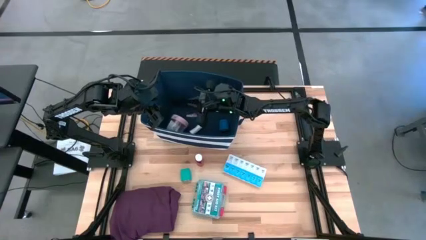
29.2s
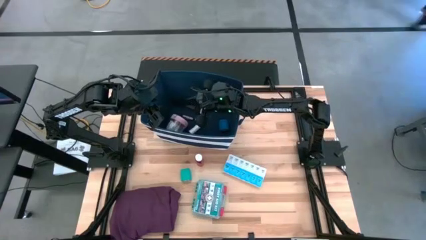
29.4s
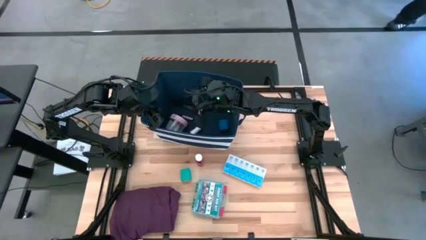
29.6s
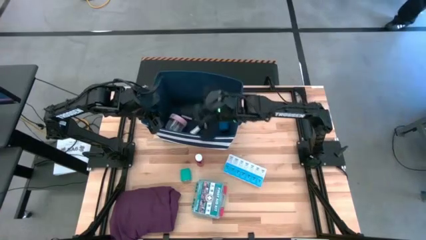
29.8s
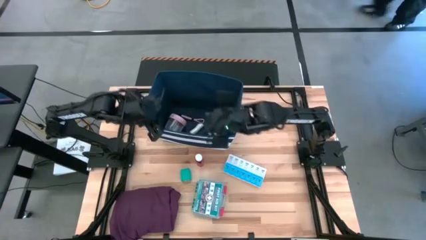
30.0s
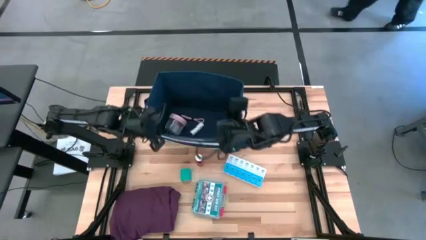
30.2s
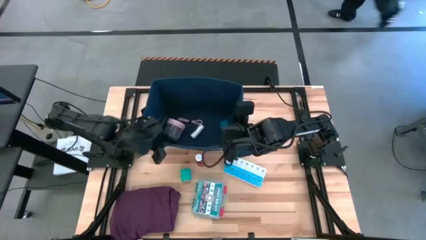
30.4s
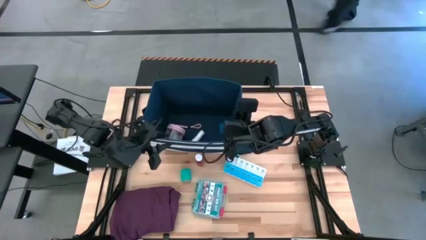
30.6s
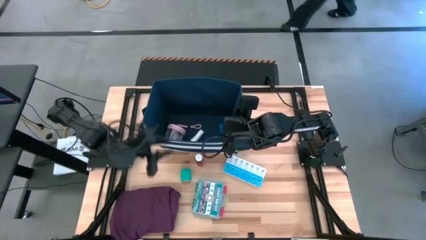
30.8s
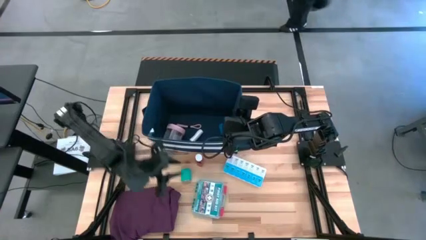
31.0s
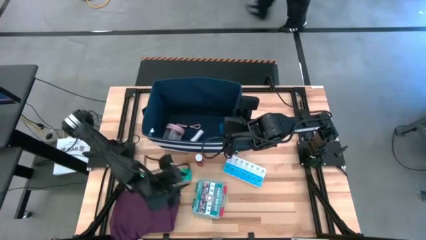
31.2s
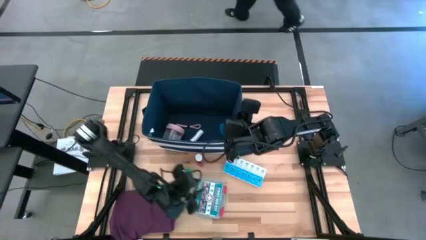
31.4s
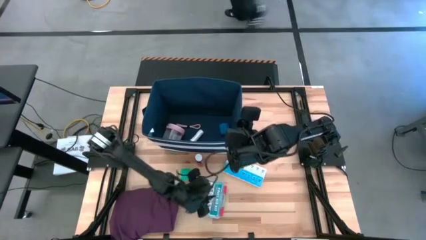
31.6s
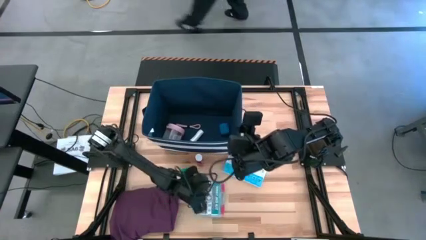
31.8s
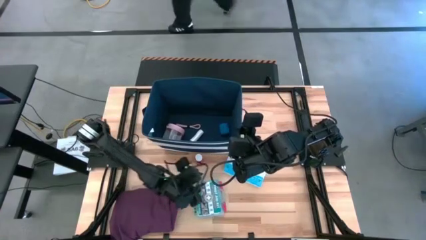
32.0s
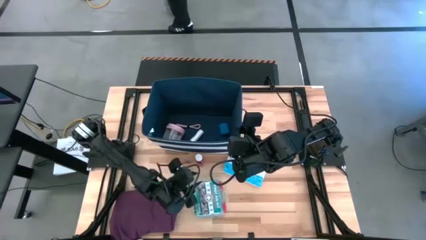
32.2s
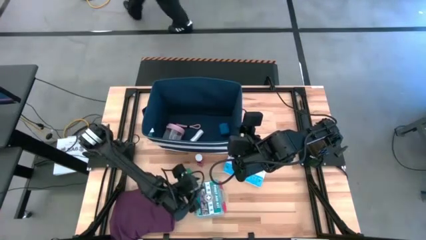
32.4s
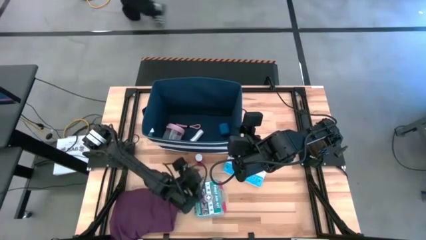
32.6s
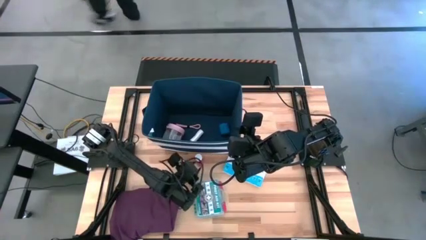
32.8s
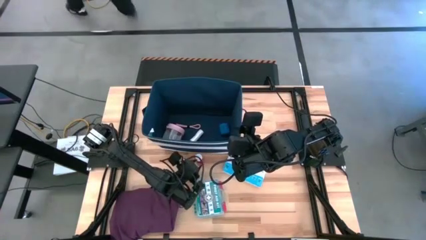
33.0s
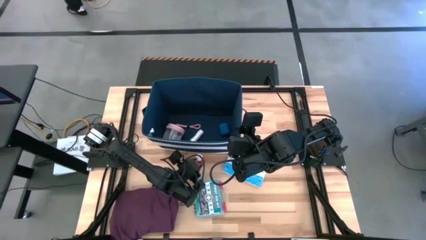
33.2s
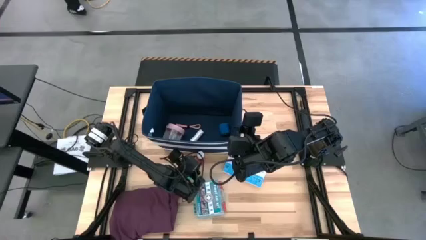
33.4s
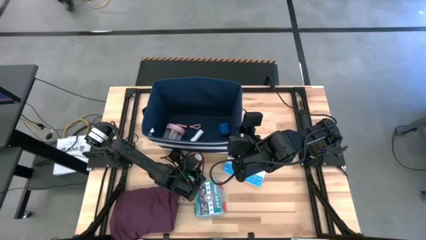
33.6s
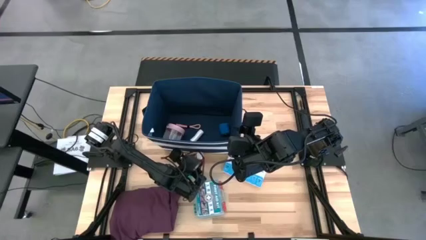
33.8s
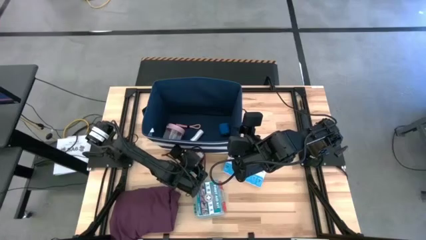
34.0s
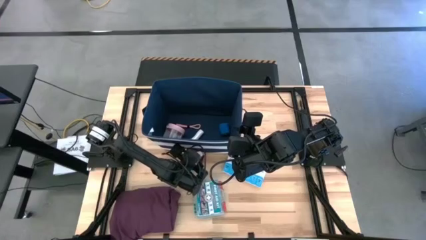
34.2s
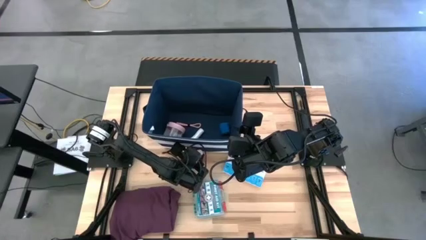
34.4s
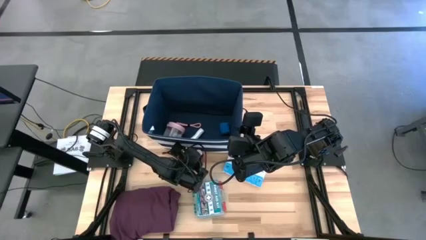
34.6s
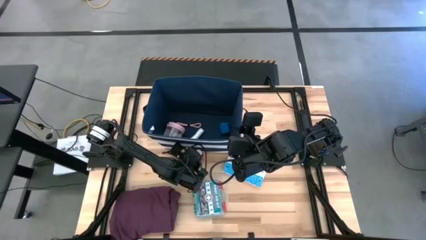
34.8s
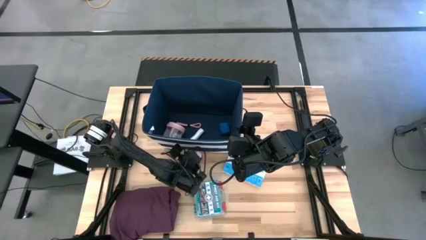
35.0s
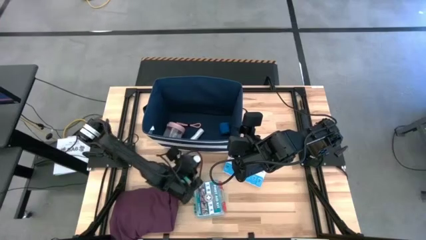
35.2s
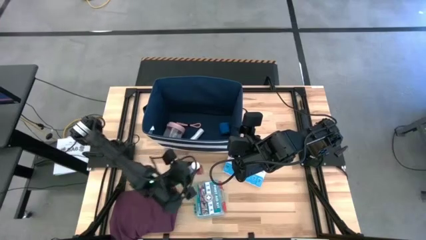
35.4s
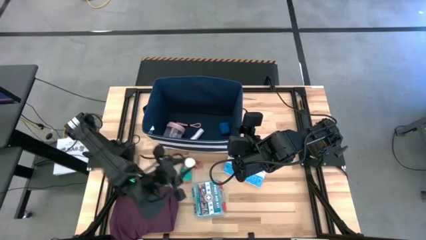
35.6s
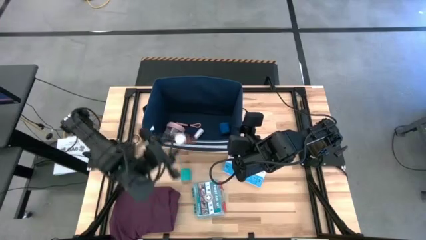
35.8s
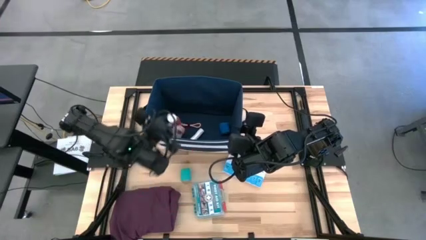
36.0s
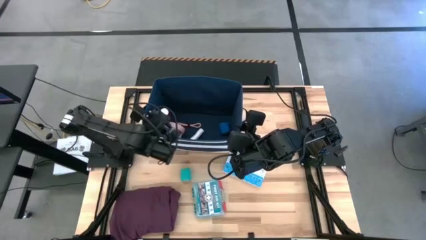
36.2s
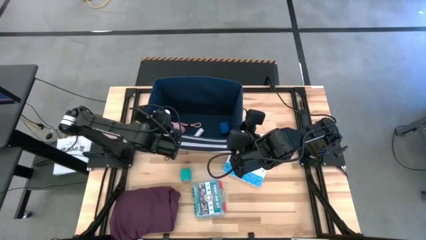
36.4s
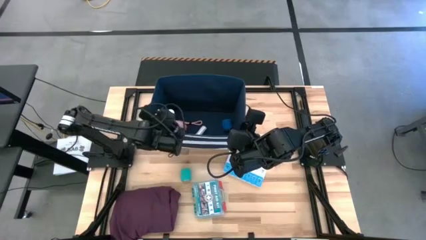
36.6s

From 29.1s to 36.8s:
Task: Pick & place medical supplies in basket/bin
Put the red pill bottle into the blue bin

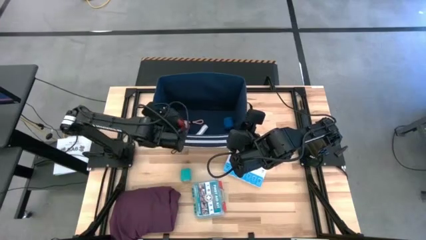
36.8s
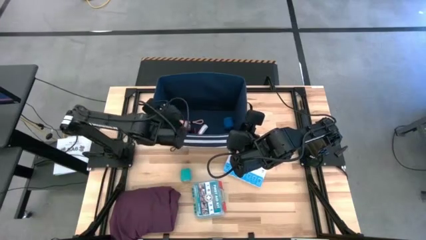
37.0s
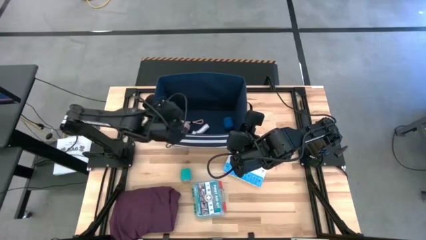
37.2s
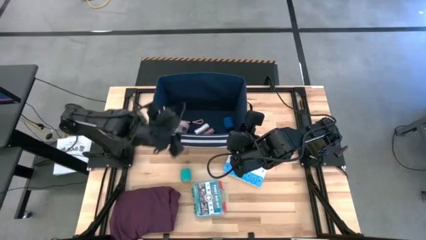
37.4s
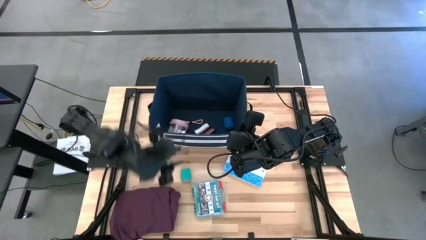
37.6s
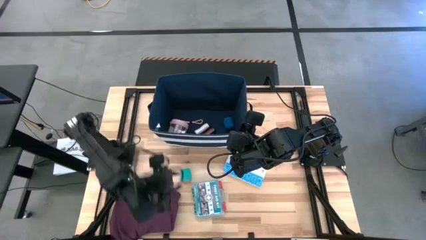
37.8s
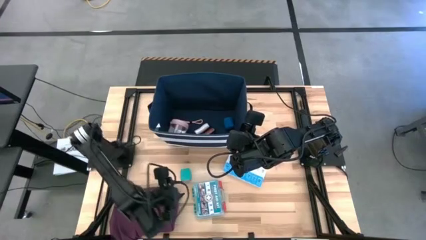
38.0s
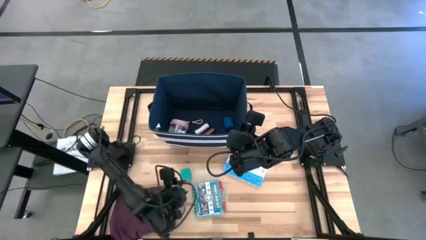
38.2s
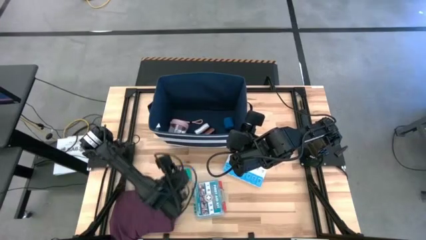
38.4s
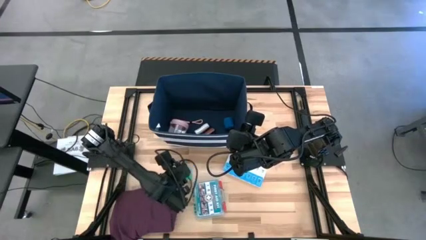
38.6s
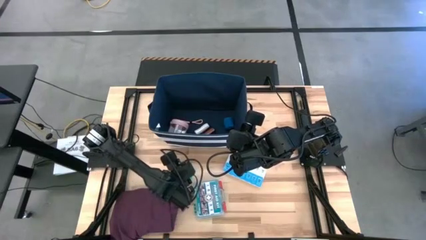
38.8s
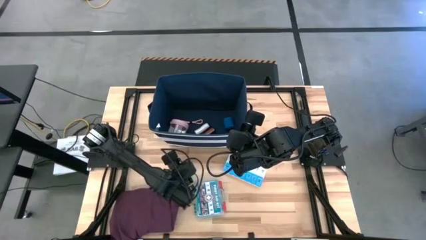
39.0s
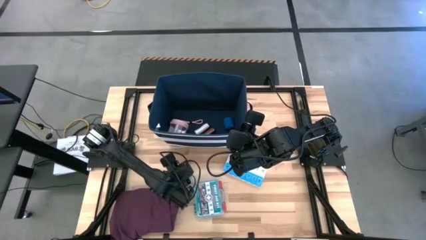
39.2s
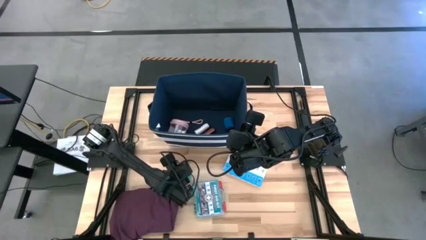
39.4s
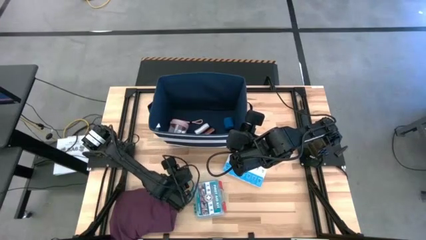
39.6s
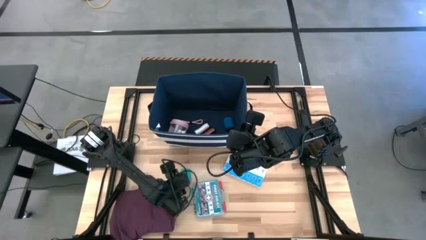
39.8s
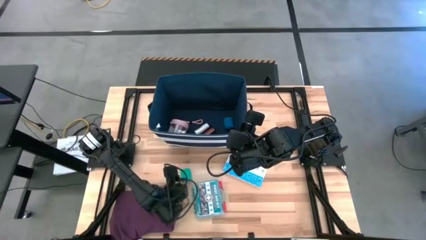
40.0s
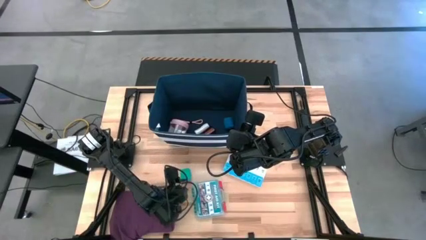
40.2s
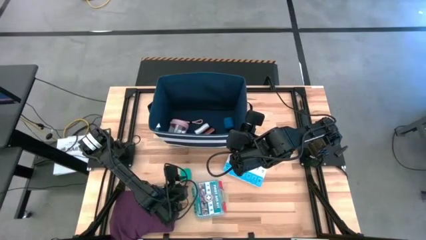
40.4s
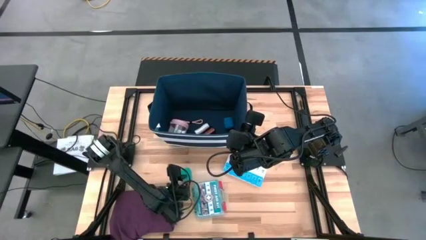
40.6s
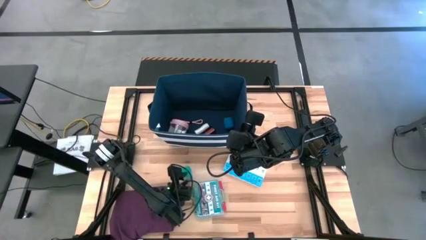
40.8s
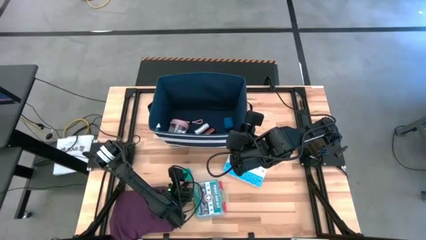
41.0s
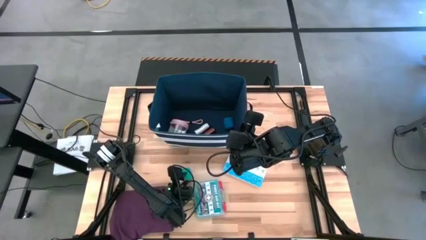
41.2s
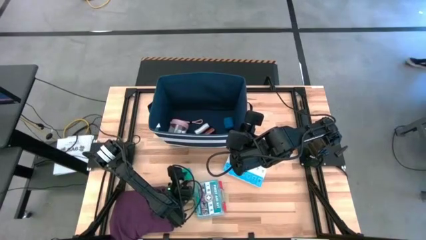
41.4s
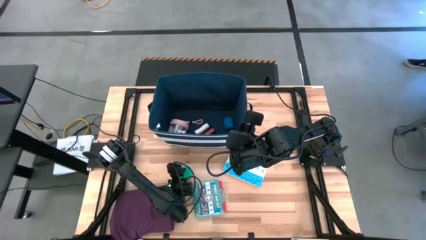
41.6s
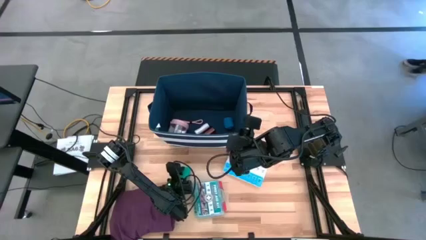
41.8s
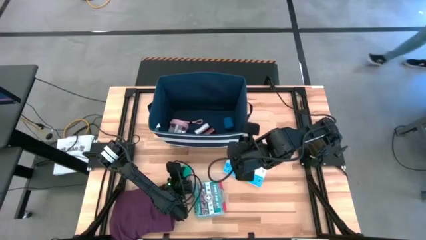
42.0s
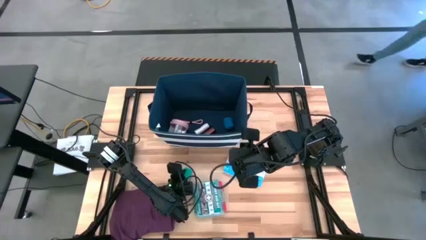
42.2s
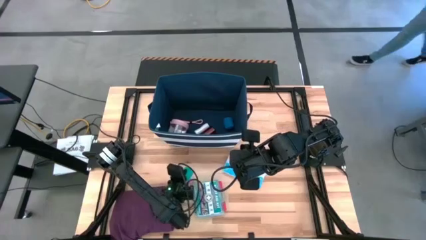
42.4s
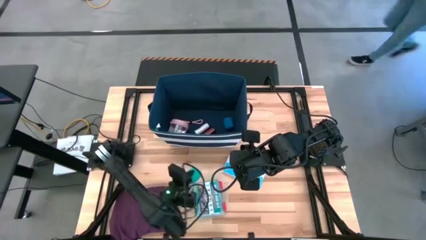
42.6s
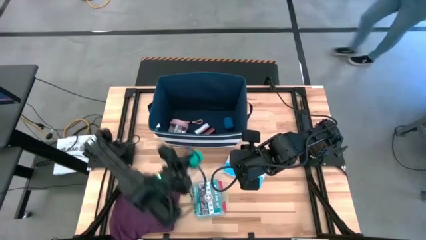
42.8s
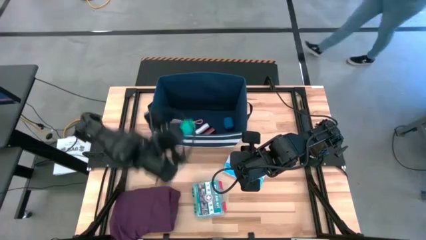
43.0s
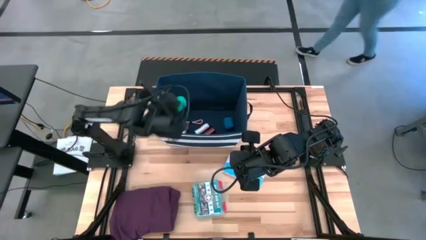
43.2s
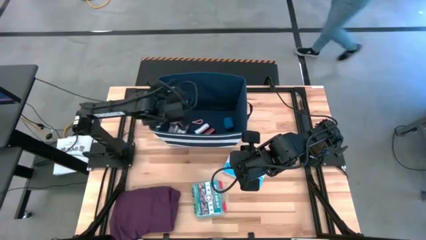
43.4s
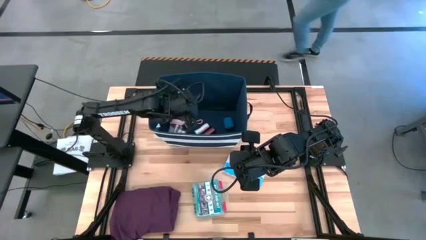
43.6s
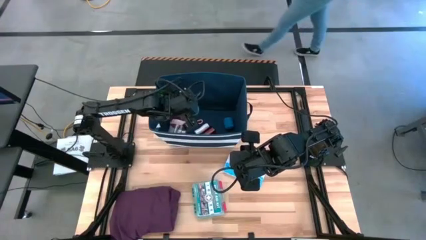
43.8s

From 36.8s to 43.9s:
Put the light green bandage into the blue bin

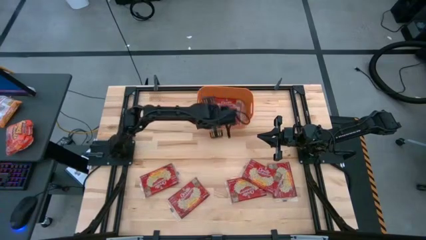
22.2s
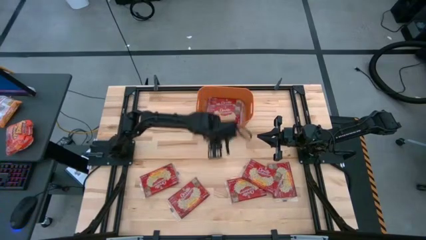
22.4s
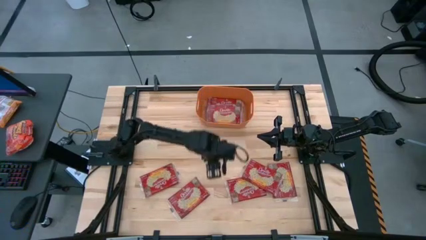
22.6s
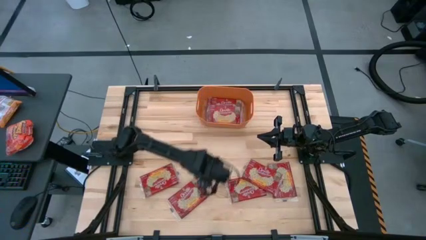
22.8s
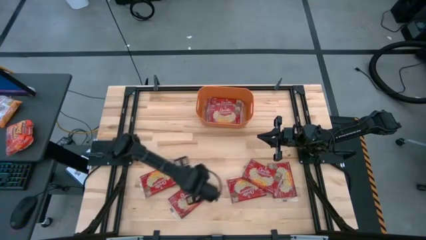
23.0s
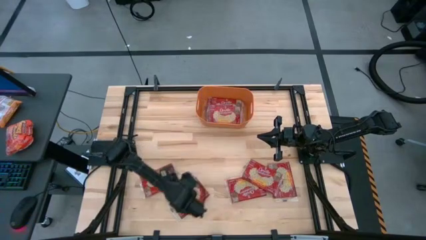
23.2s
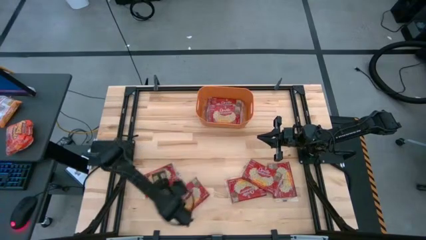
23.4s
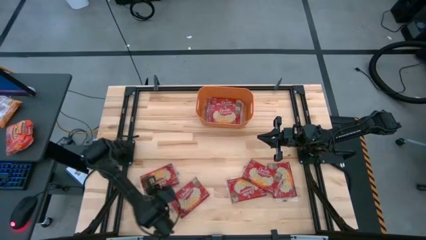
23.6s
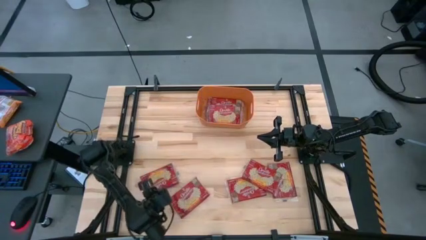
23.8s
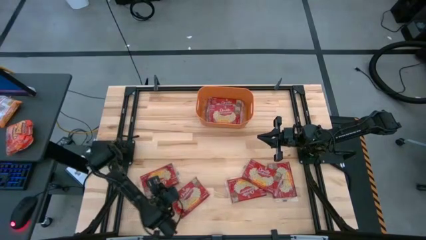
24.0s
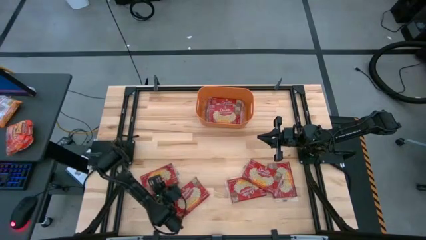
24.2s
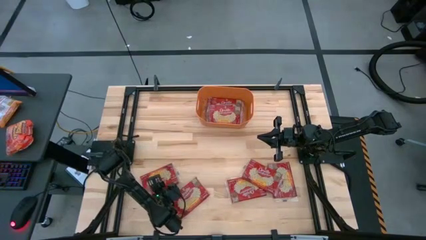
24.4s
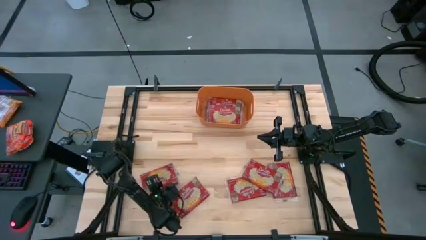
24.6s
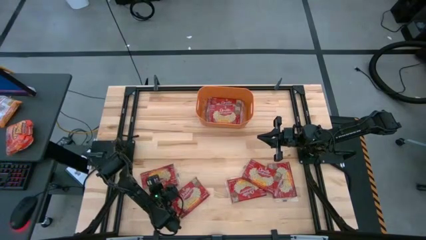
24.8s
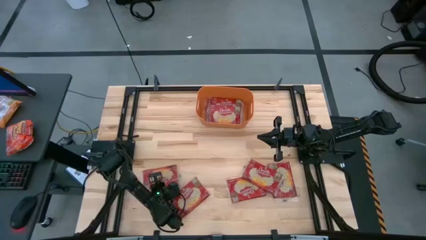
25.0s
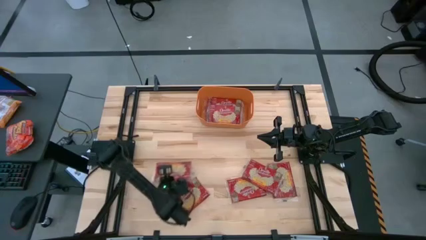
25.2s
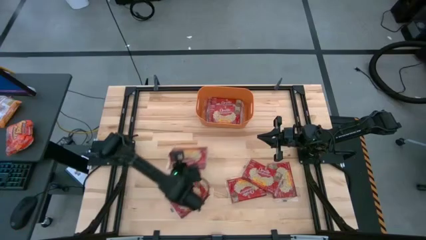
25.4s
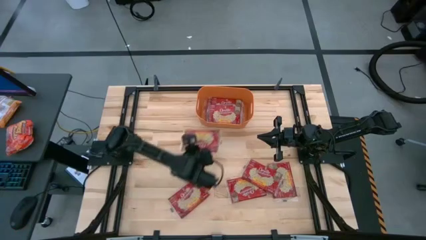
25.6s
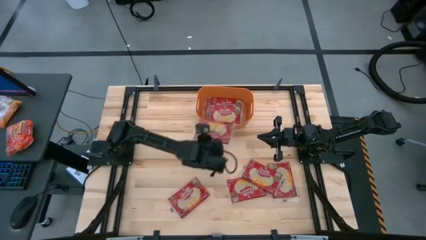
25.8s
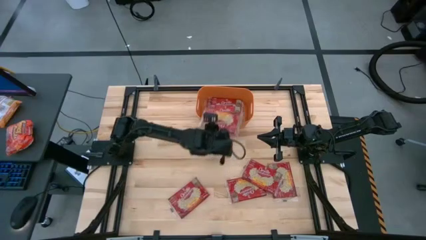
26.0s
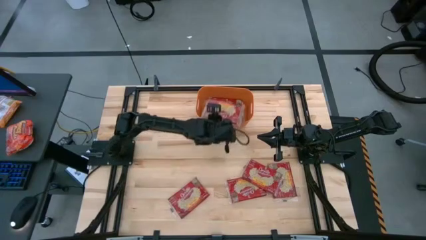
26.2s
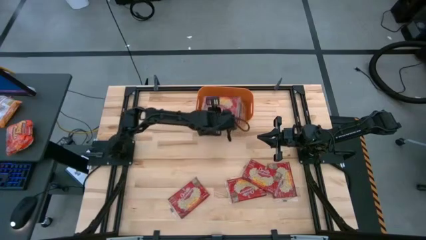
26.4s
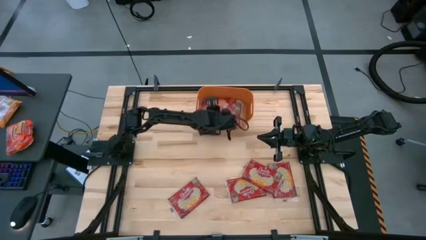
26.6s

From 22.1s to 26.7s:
Task: Sort popcorn bags into baskets
Put the red popcorn bag into the orange bin
